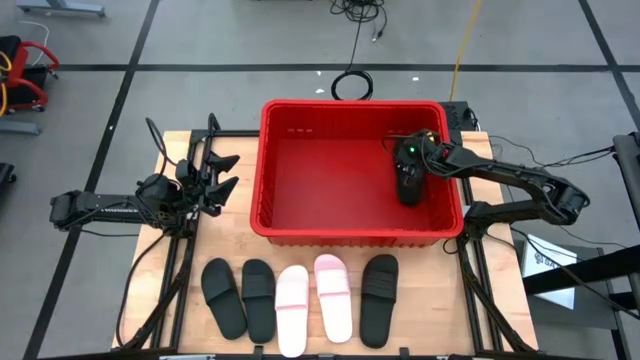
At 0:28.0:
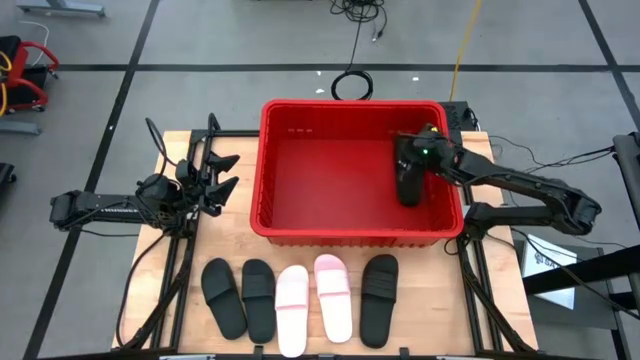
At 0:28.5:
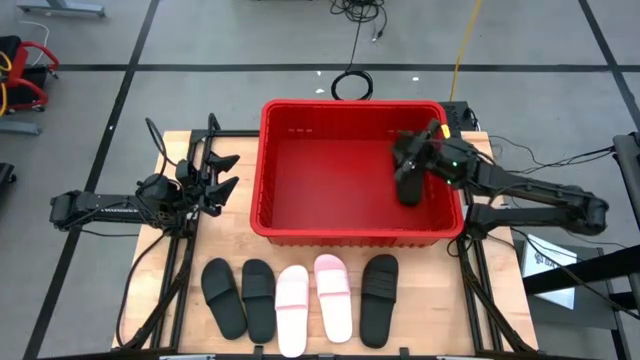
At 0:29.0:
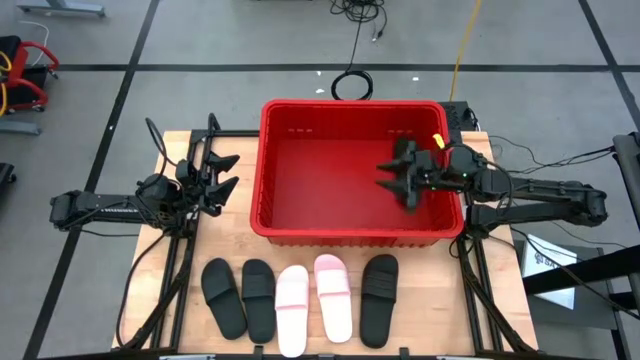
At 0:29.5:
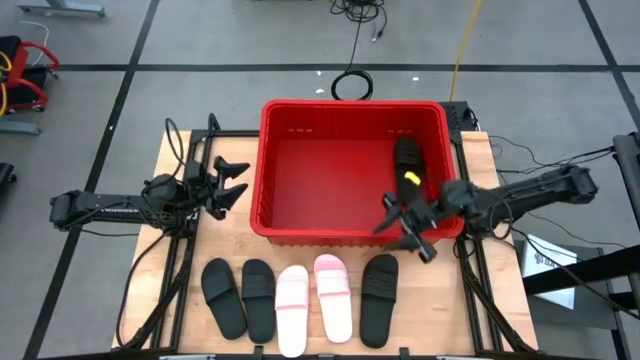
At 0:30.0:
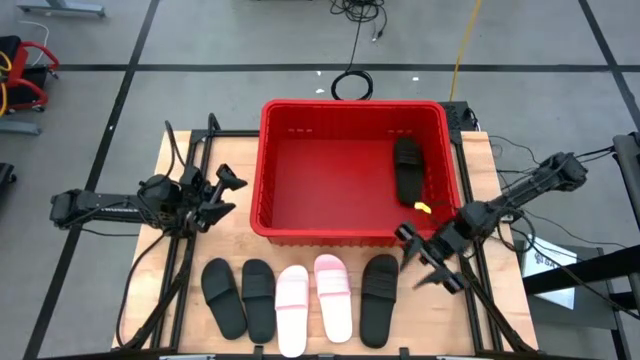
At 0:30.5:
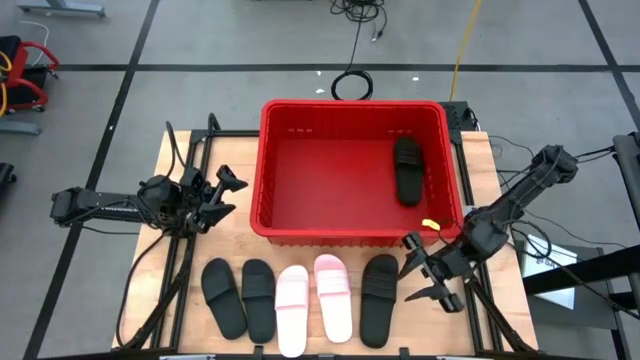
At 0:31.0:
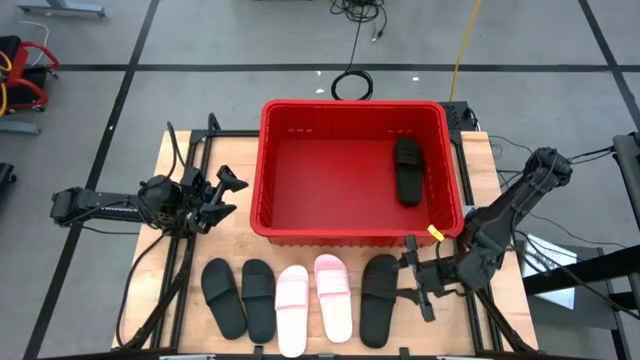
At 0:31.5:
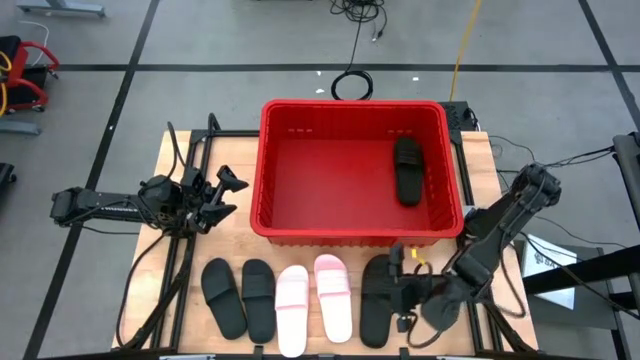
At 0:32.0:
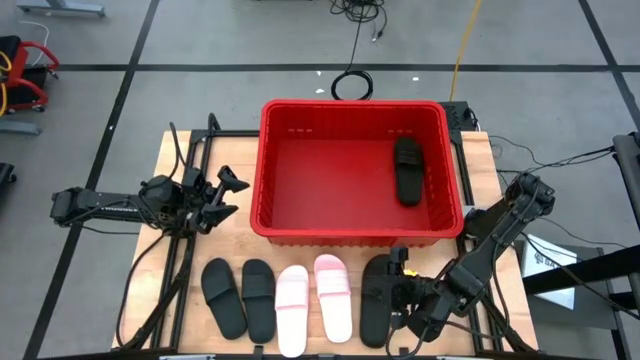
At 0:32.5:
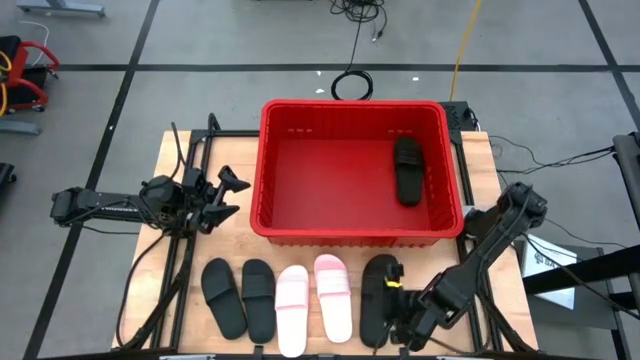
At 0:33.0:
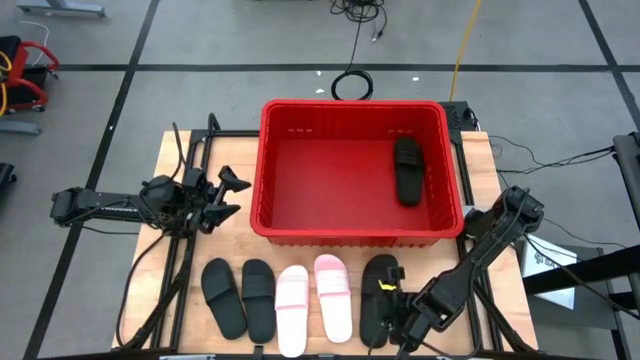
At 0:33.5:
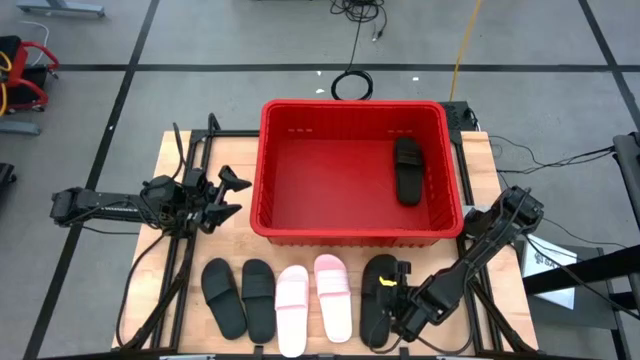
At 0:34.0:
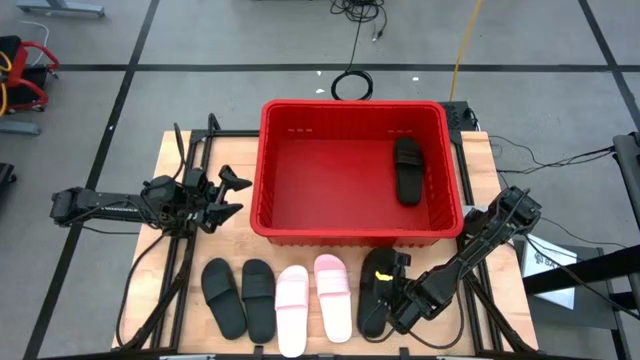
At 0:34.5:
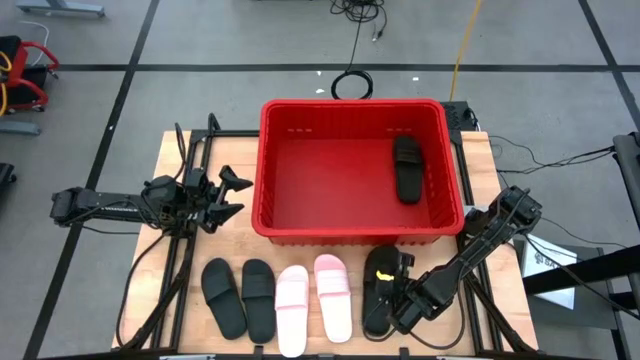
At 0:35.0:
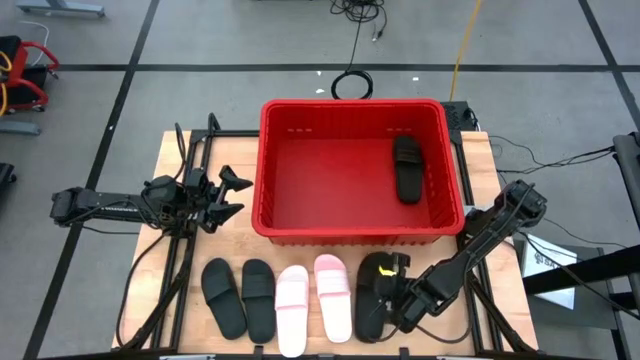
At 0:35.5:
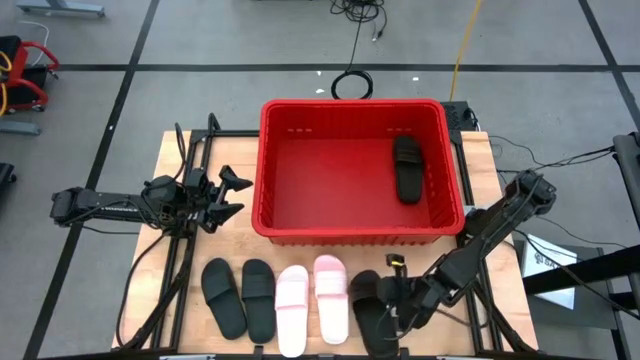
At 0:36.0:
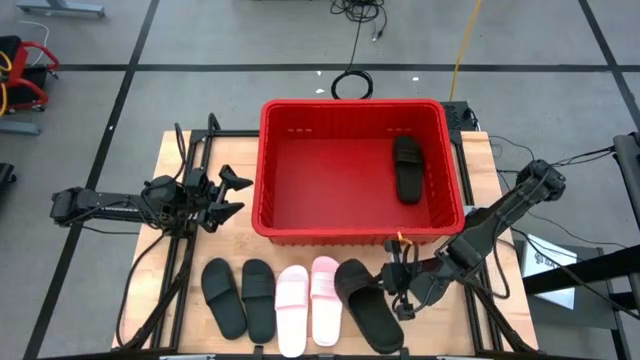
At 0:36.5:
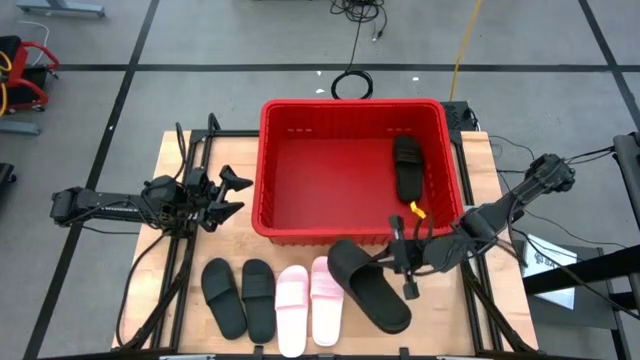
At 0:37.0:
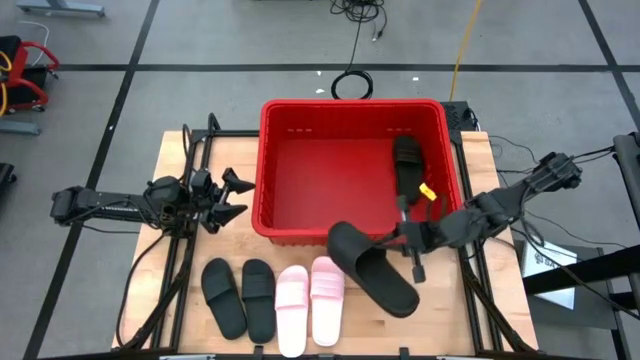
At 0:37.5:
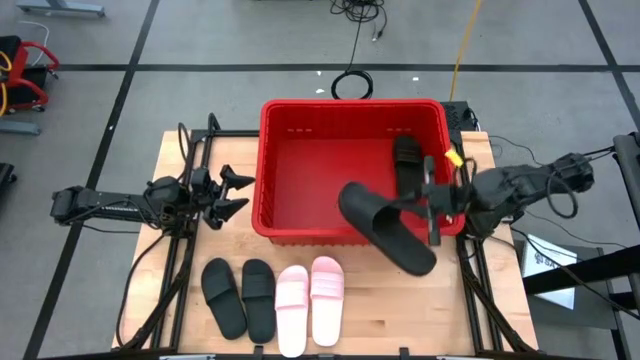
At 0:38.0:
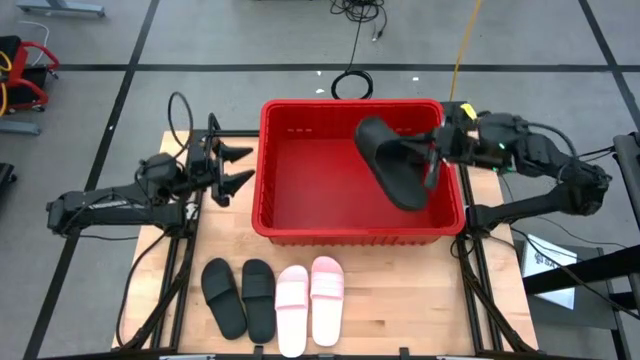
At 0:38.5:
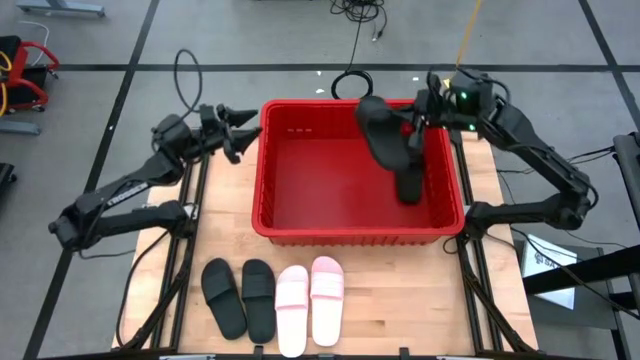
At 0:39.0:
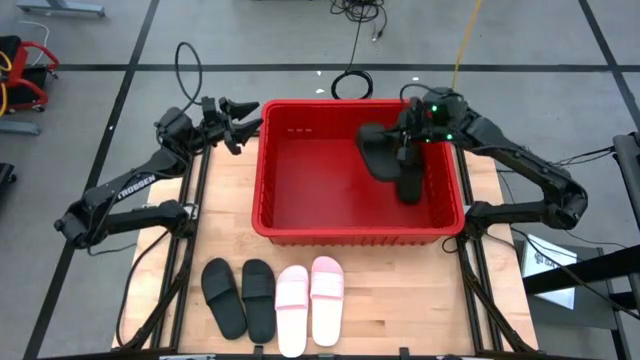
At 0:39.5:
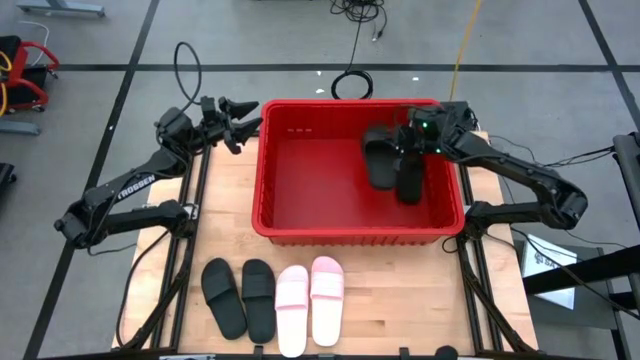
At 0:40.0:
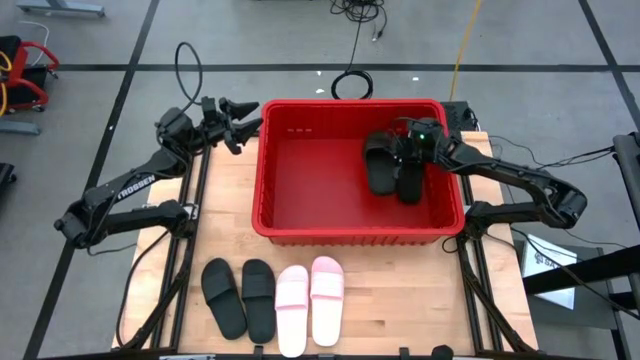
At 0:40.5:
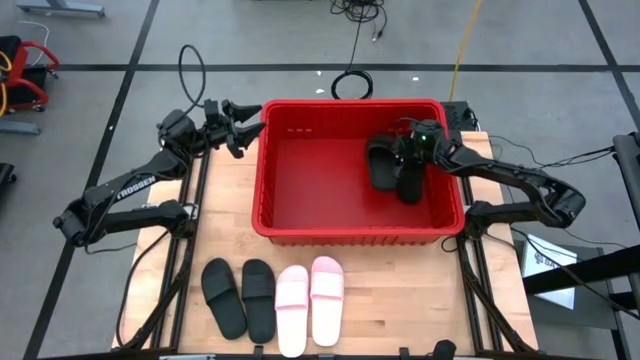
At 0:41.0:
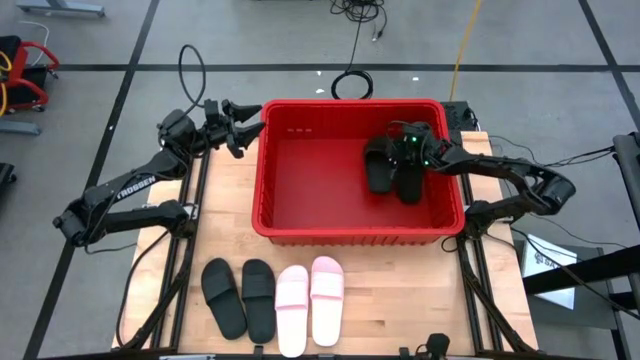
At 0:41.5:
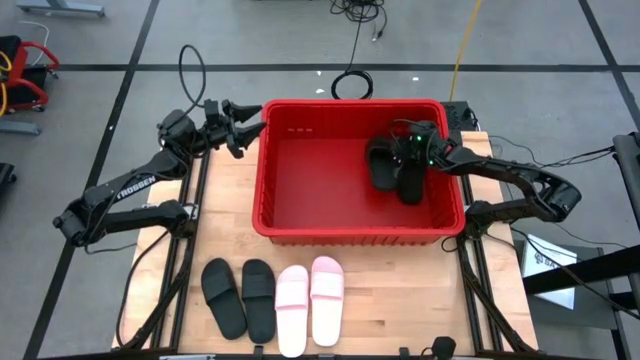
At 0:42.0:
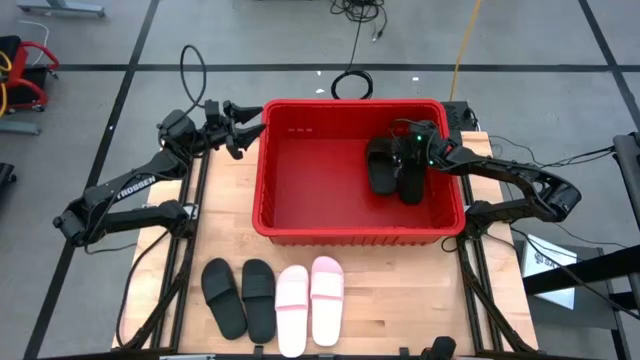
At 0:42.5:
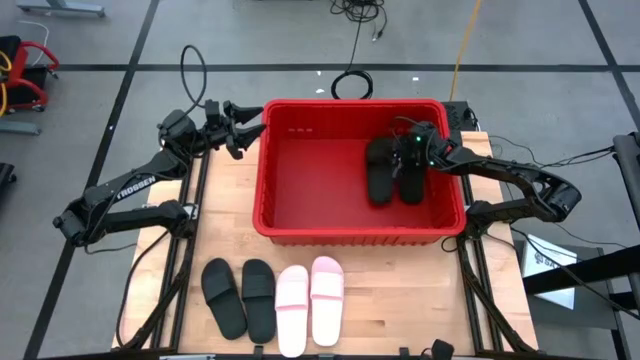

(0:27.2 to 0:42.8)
Task: Pick and place slides into bin
Put the black slide into the red basket
